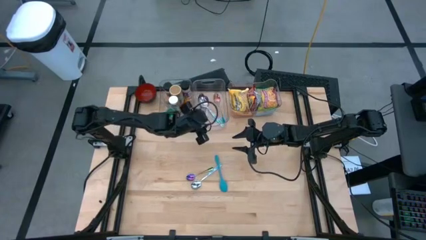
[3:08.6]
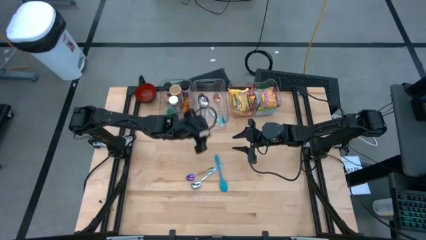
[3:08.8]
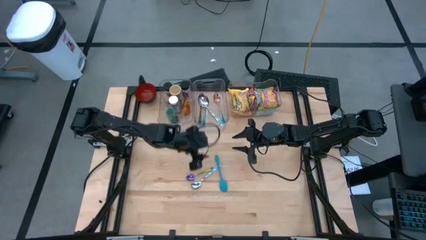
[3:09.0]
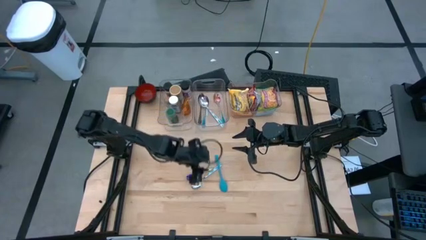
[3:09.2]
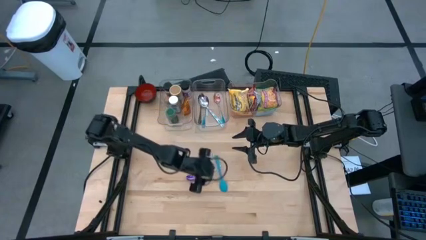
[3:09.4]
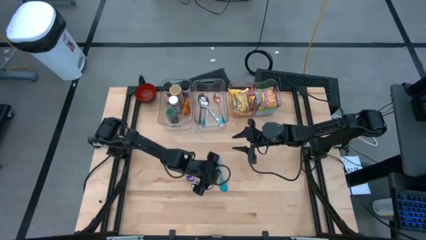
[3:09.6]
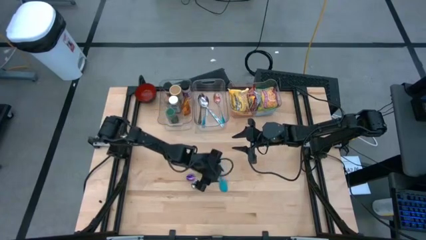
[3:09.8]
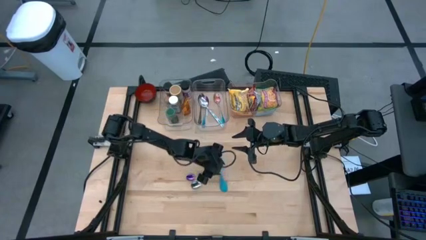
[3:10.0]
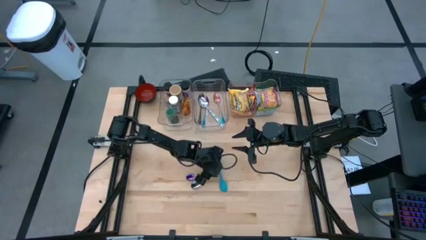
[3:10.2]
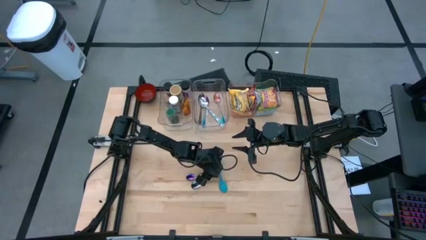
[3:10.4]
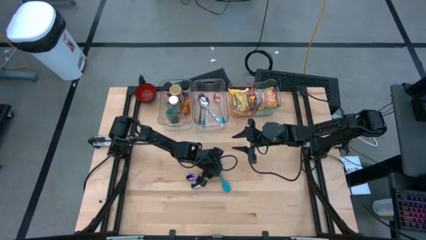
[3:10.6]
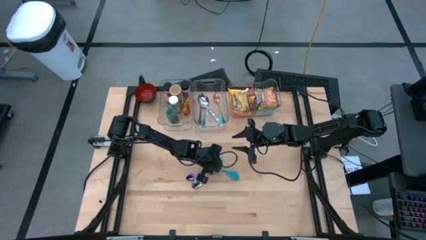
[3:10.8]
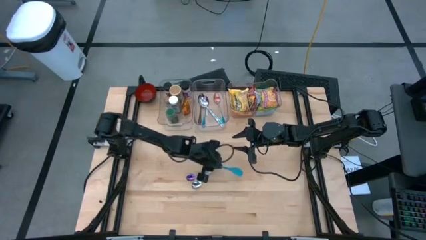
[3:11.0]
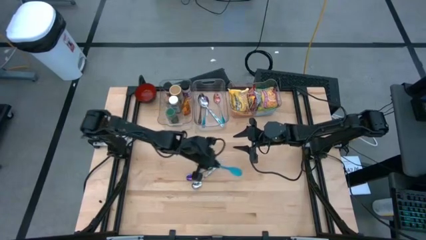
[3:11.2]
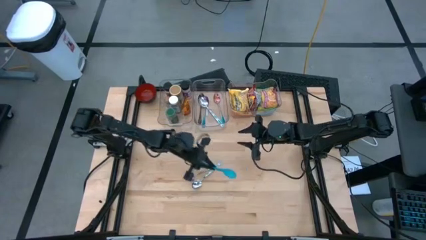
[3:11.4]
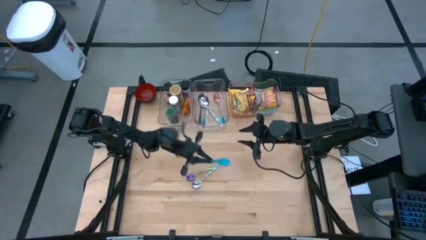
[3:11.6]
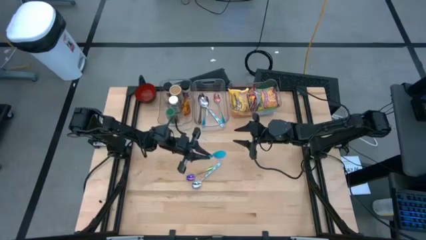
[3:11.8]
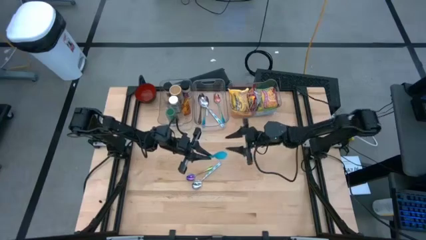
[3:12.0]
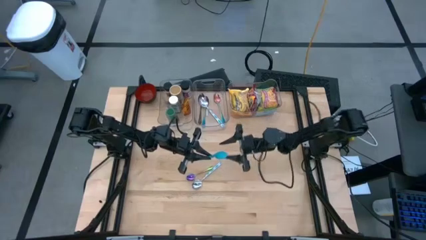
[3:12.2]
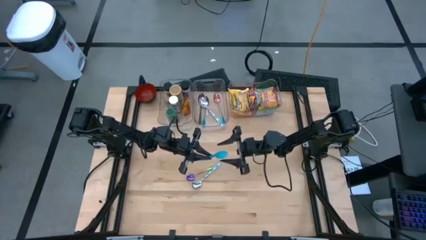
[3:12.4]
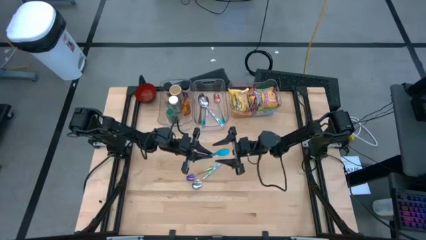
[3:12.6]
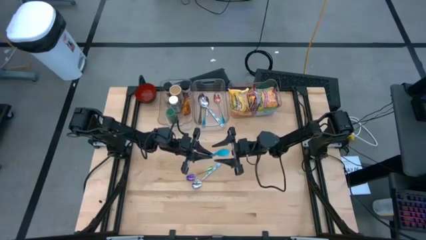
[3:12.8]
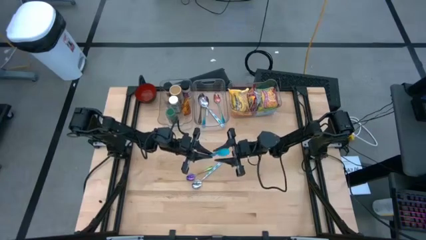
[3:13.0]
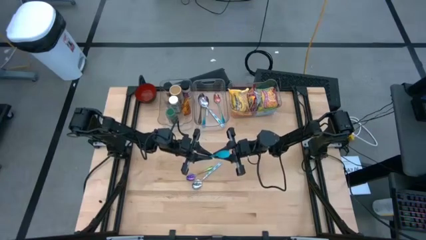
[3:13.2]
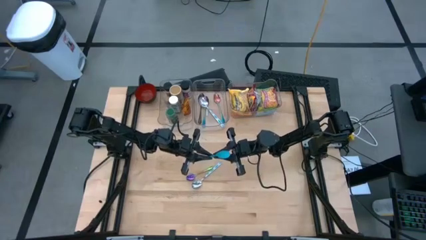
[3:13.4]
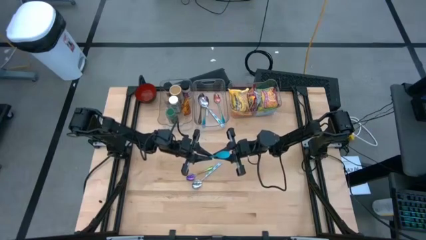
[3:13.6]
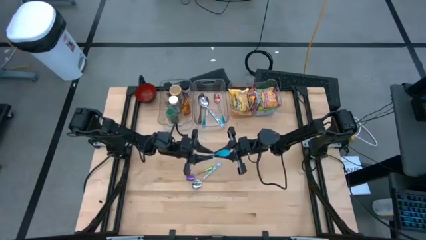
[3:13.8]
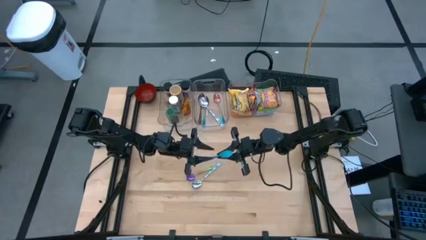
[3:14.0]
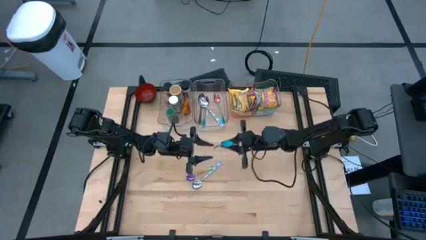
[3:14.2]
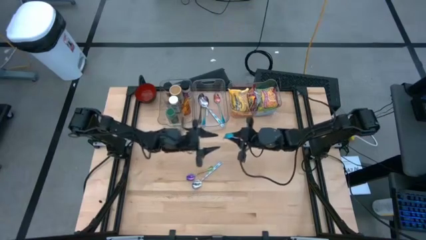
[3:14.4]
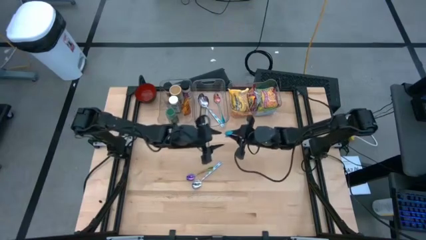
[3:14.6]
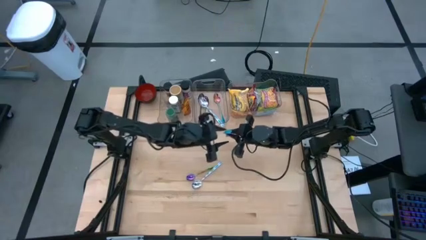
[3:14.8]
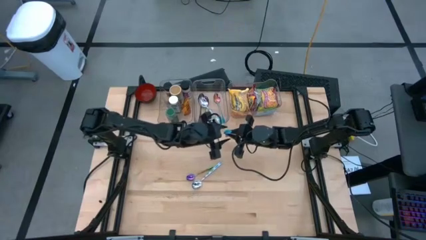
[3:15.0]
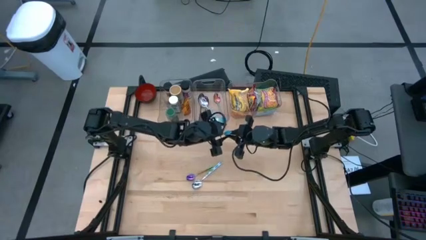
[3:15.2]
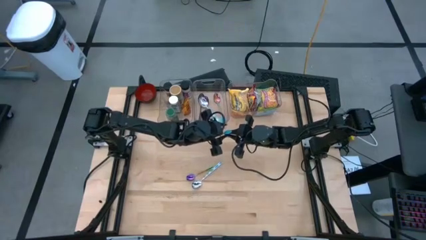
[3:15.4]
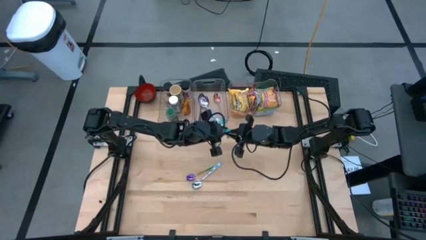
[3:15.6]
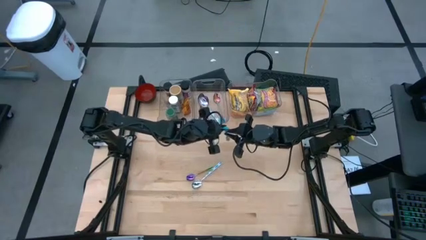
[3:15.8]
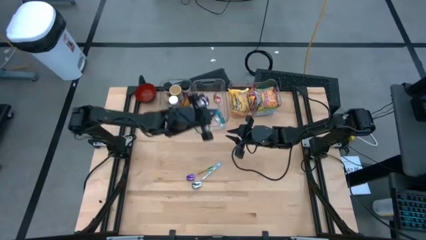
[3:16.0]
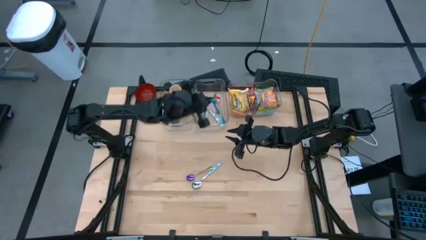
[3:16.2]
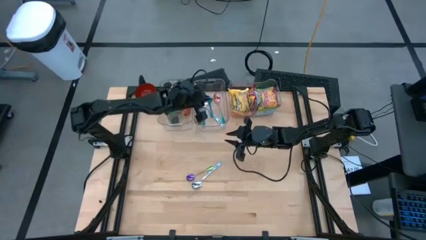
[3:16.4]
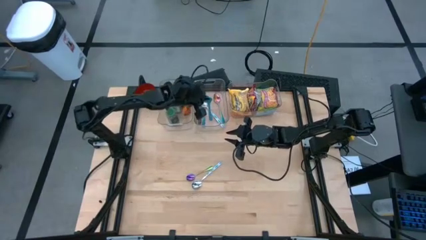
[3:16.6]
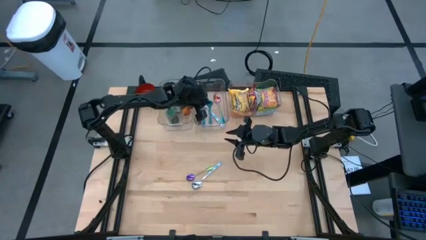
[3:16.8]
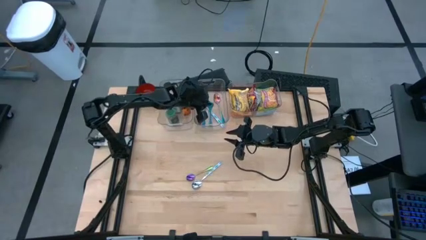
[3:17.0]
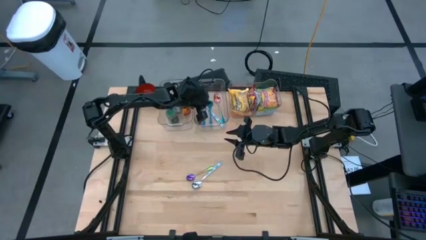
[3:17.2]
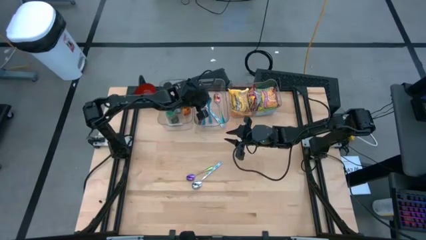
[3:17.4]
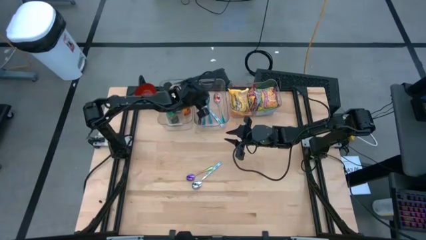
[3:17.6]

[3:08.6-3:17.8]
Task: Pick & Place Food Item
Put the blue spoon into the middle transparent bin

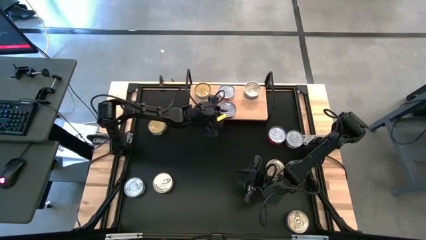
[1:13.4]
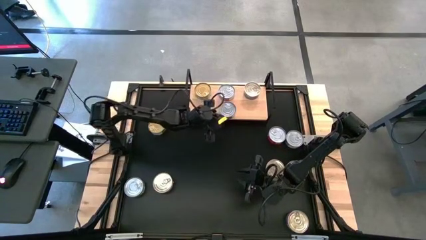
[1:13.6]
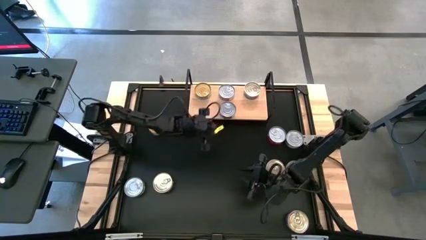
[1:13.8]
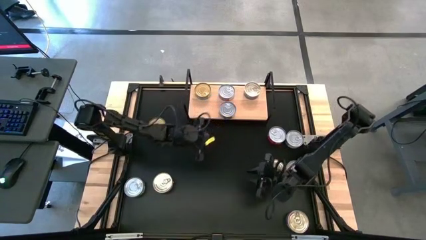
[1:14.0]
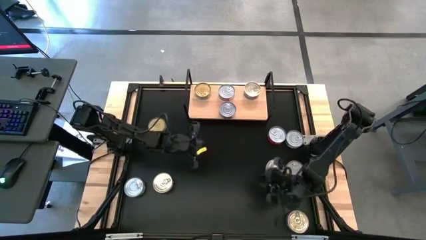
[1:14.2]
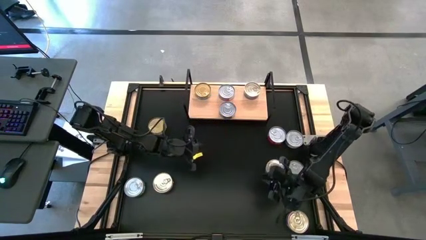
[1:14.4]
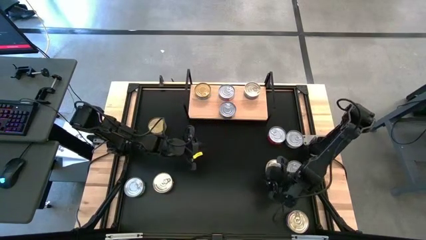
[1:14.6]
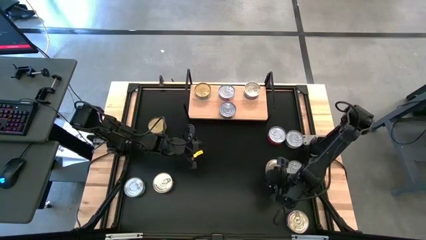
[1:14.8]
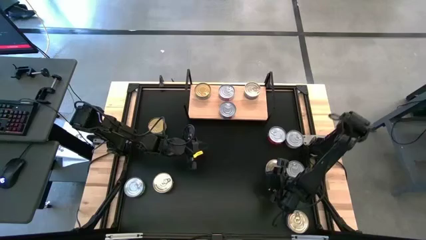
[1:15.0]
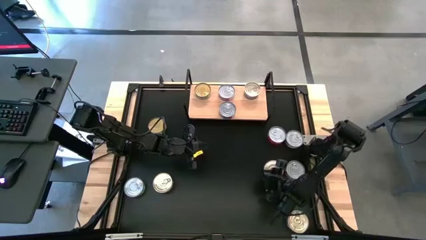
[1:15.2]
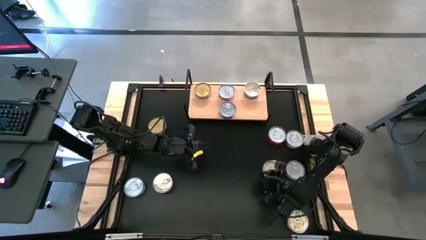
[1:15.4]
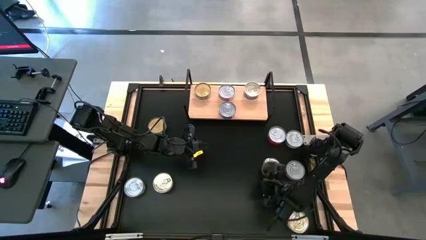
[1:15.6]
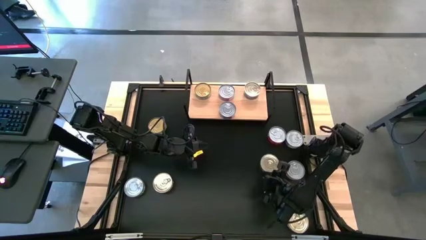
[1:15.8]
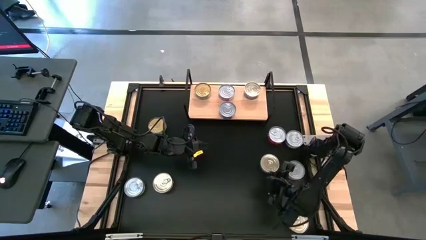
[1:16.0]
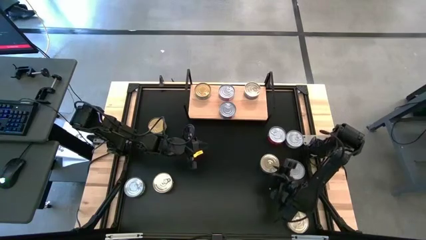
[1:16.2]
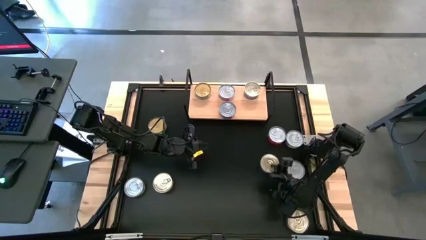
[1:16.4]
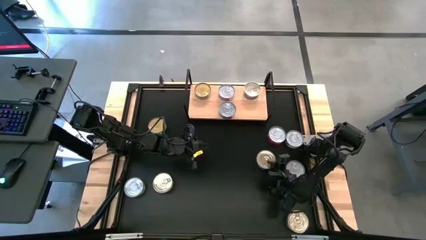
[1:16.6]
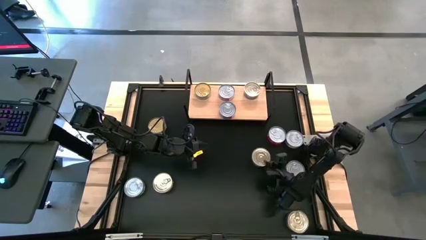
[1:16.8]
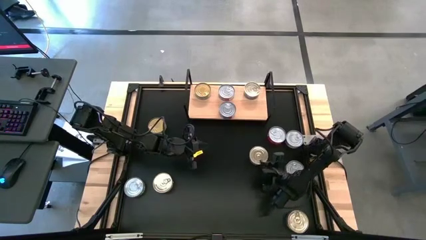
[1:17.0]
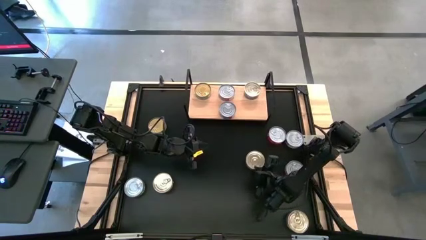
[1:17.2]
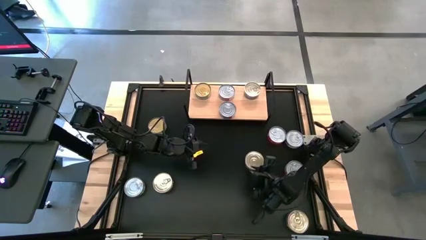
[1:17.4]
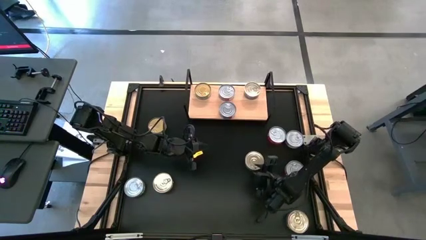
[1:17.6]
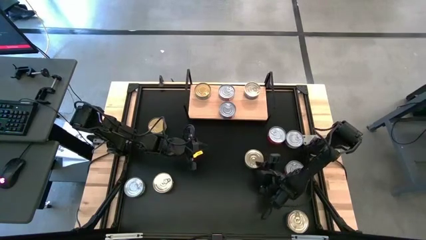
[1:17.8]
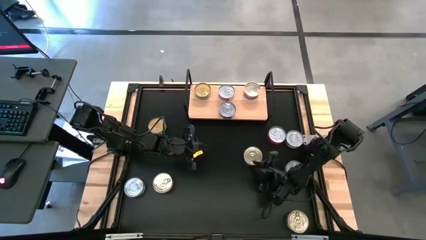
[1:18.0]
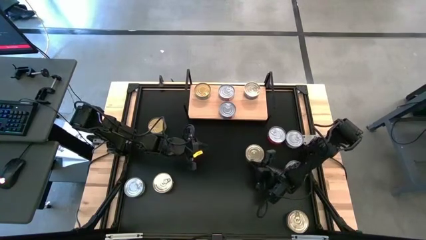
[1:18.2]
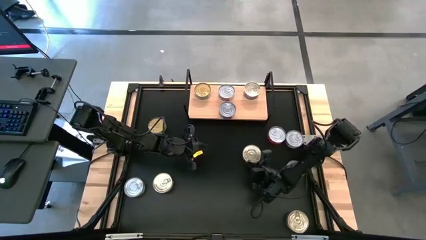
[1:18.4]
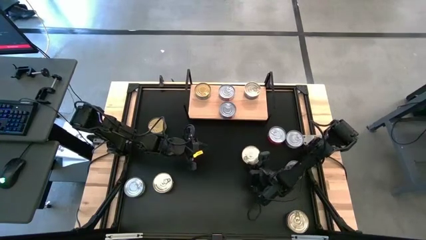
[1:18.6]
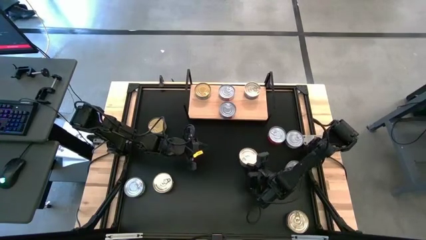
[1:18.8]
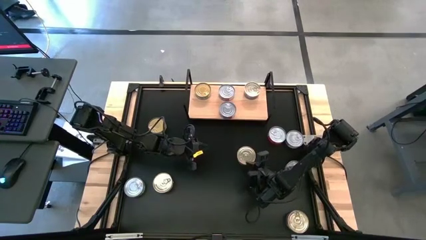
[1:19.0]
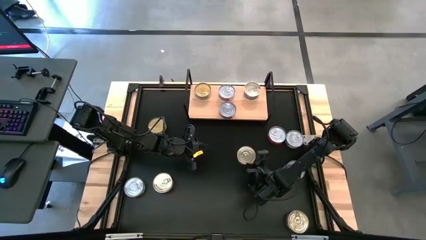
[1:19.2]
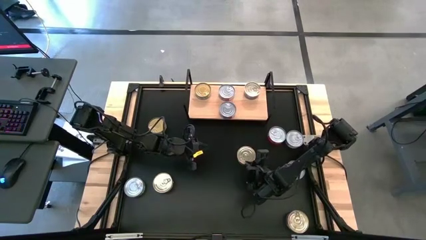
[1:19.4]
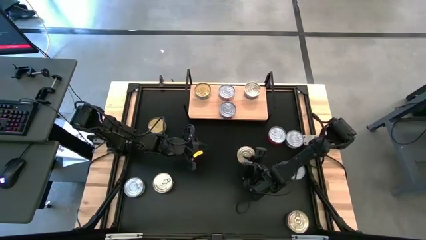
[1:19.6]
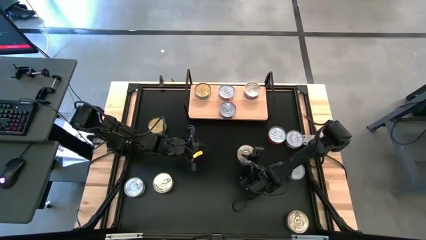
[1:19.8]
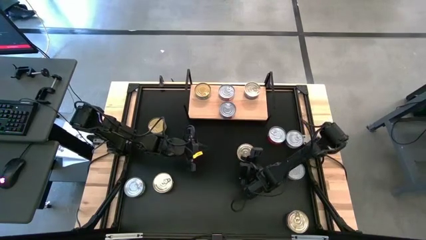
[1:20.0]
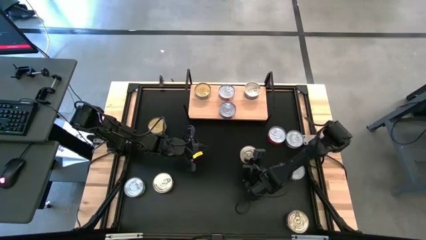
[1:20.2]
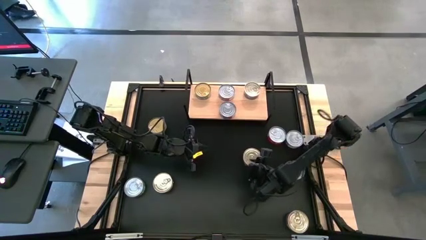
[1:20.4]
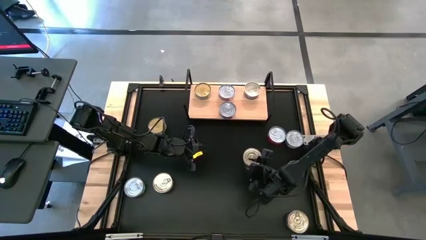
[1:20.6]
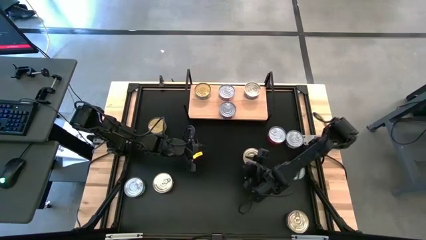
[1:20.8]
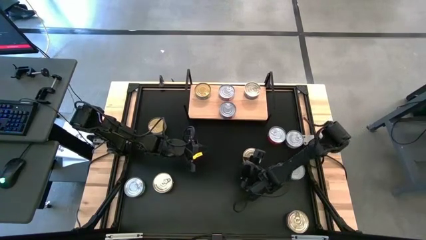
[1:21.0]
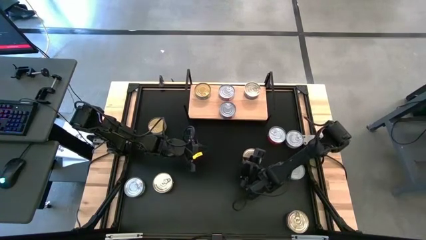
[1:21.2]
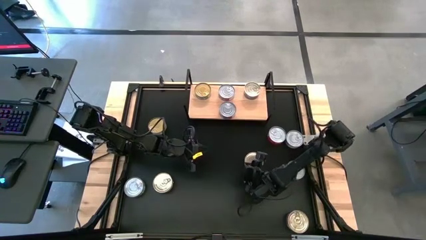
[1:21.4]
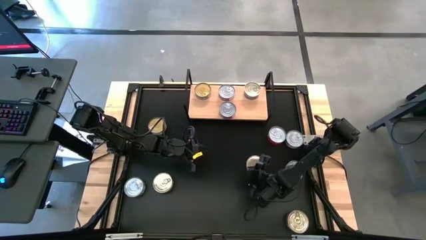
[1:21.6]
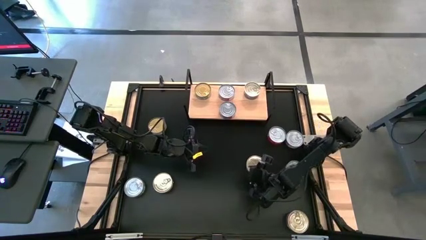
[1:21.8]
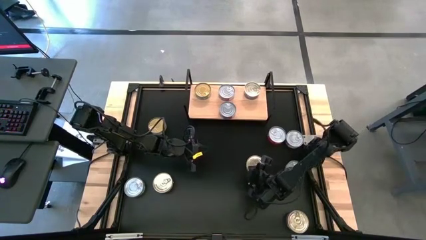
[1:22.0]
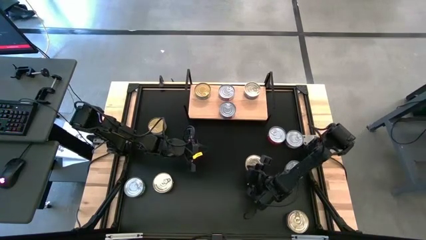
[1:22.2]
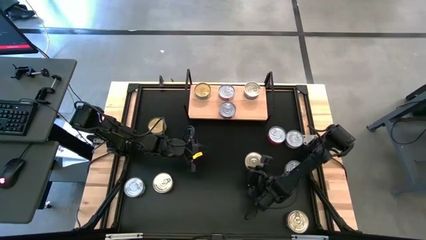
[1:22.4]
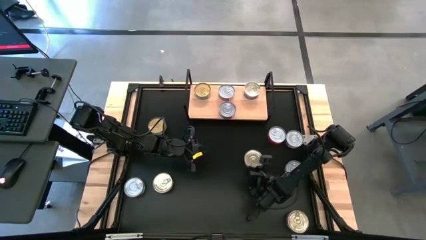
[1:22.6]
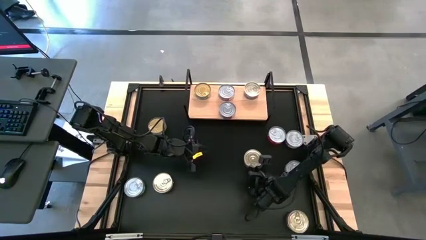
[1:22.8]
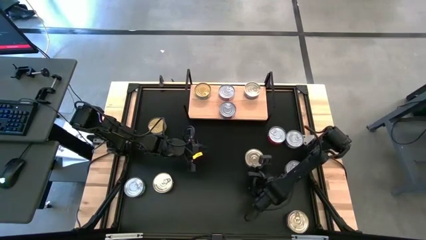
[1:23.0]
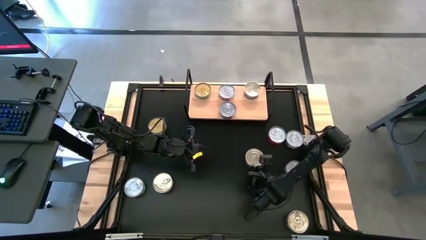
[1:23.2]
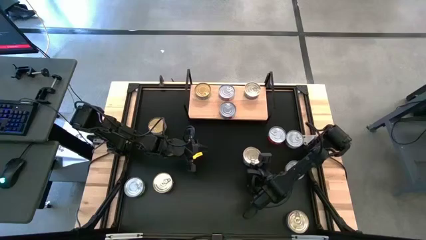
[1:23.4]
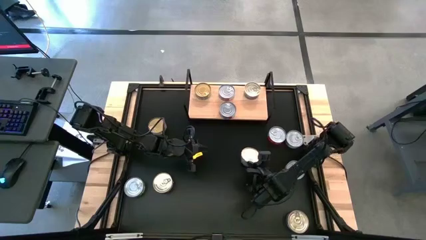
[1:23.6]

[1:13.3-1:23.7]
Task: Stack canned seafood by type on shelf
Align the blue tuna can with the other blue tuna can on the shelf
